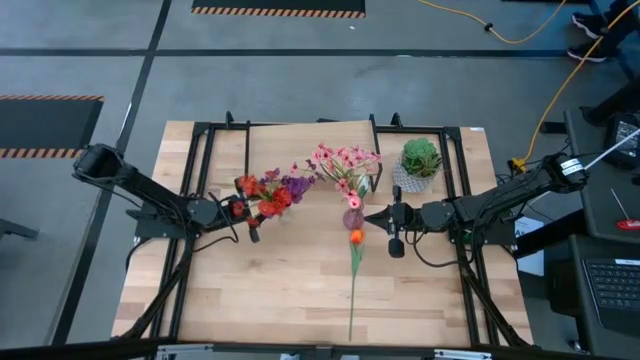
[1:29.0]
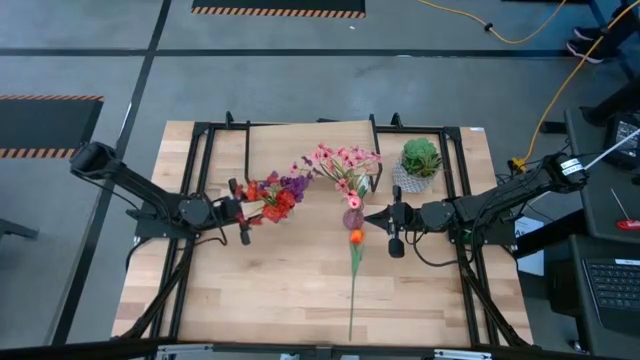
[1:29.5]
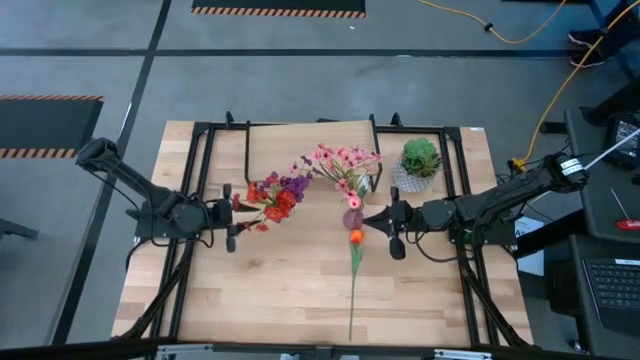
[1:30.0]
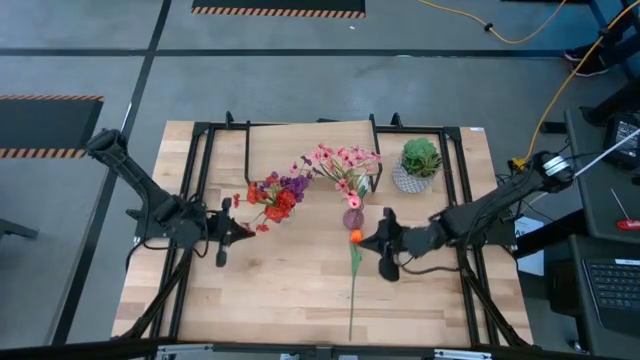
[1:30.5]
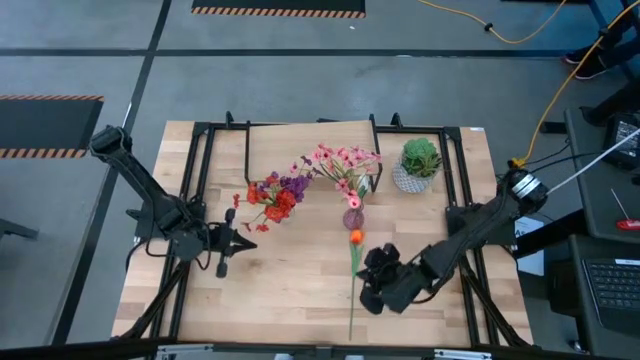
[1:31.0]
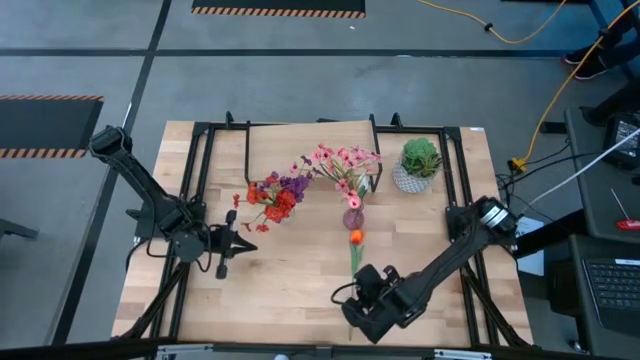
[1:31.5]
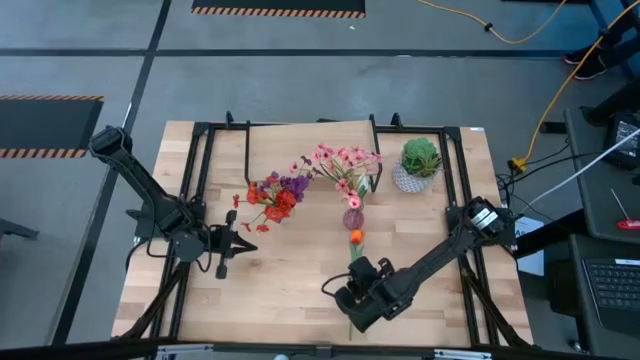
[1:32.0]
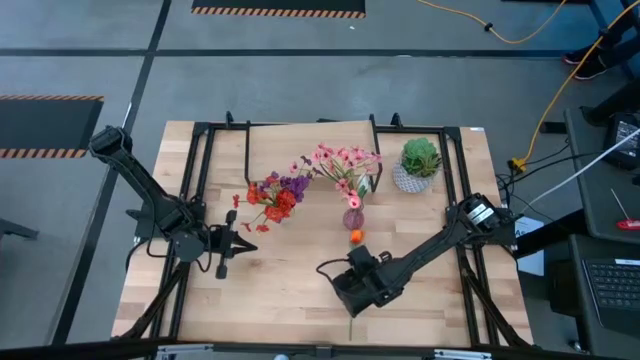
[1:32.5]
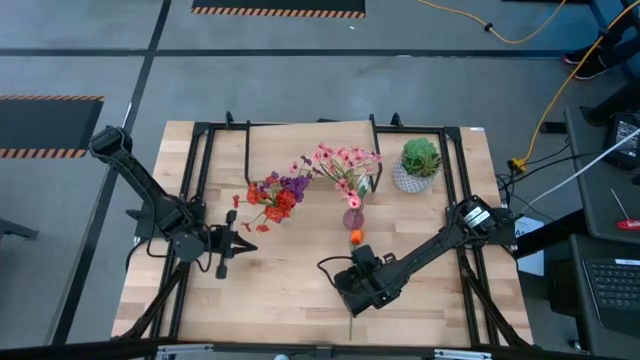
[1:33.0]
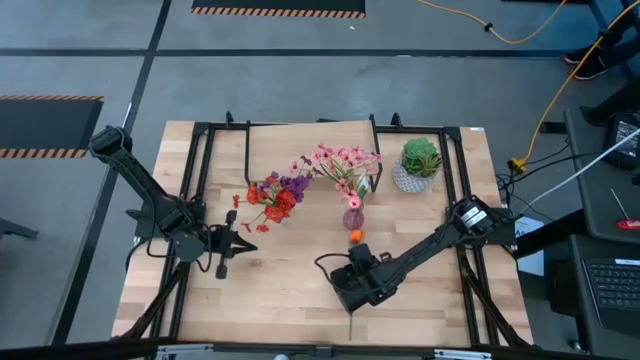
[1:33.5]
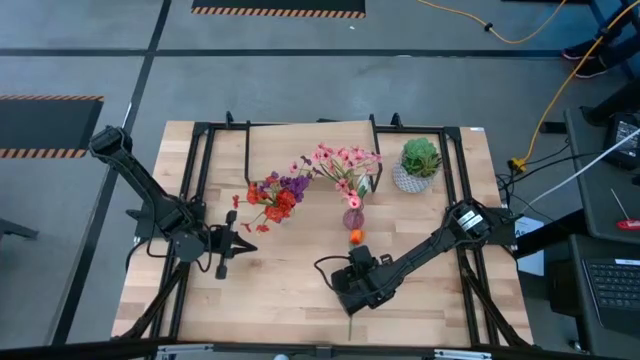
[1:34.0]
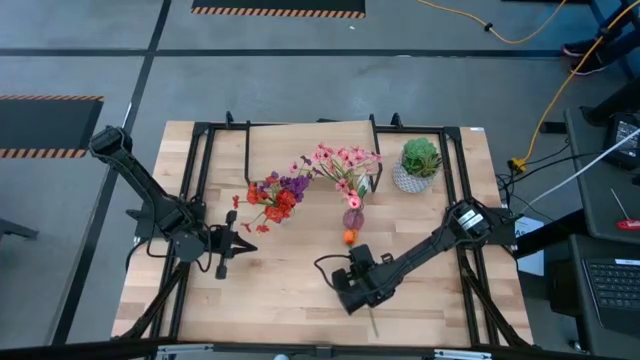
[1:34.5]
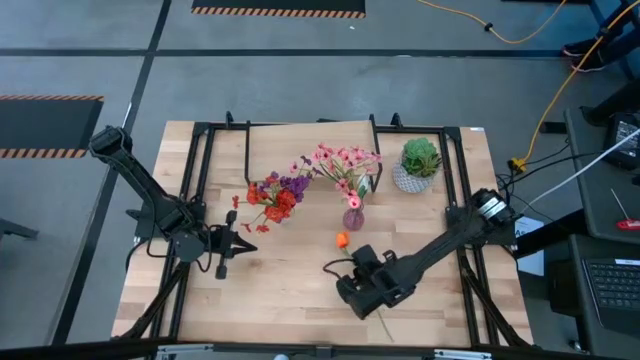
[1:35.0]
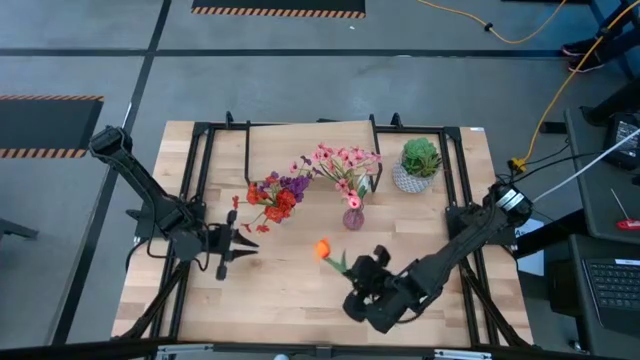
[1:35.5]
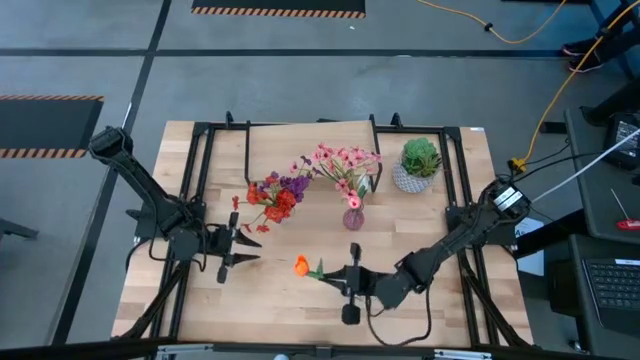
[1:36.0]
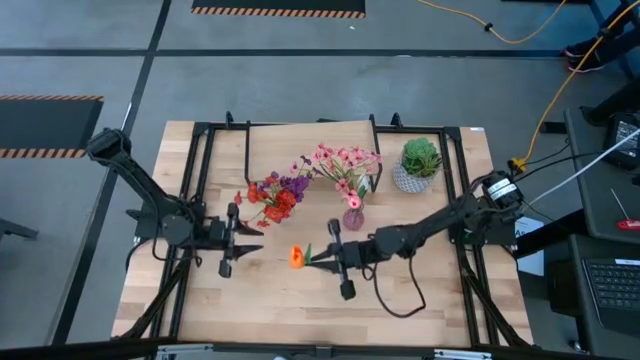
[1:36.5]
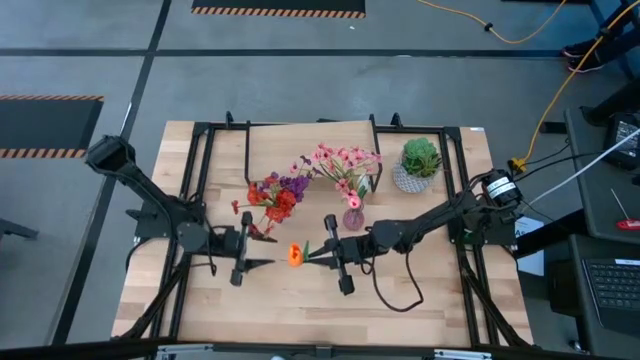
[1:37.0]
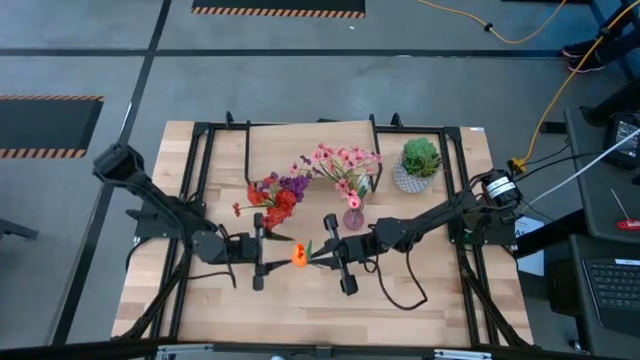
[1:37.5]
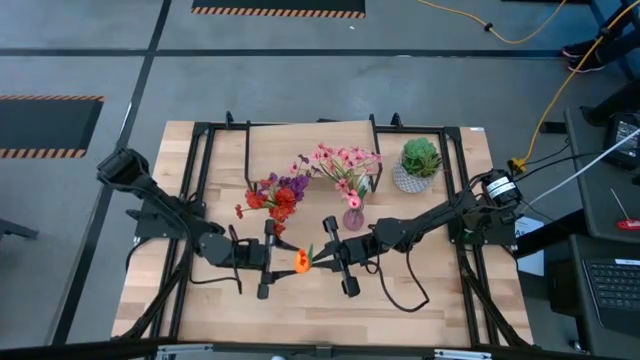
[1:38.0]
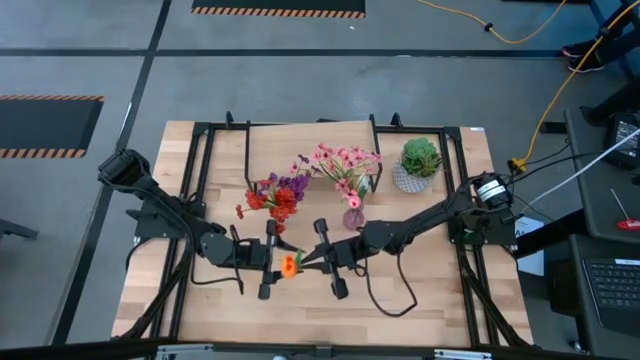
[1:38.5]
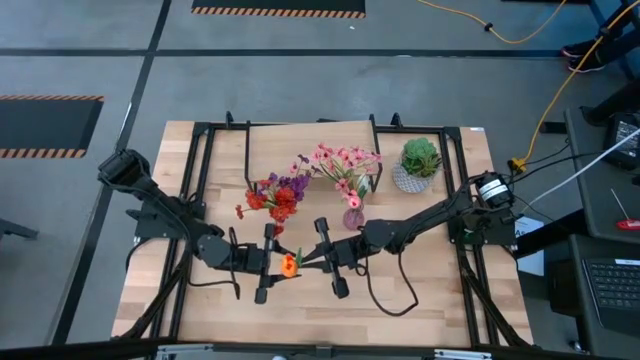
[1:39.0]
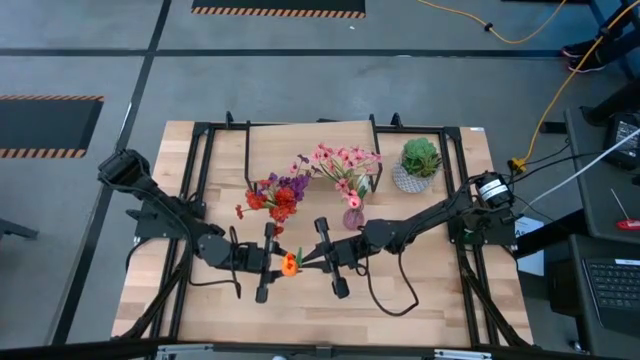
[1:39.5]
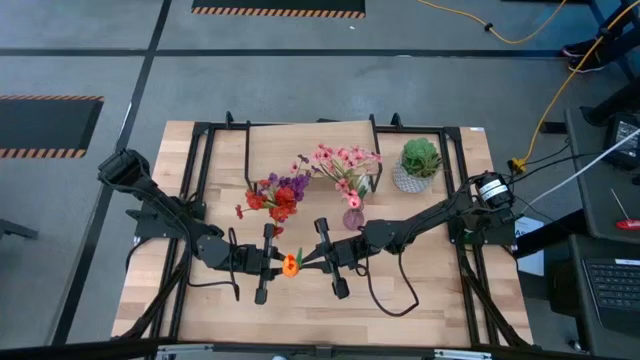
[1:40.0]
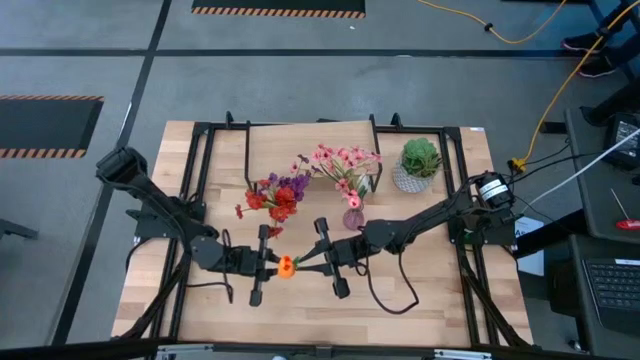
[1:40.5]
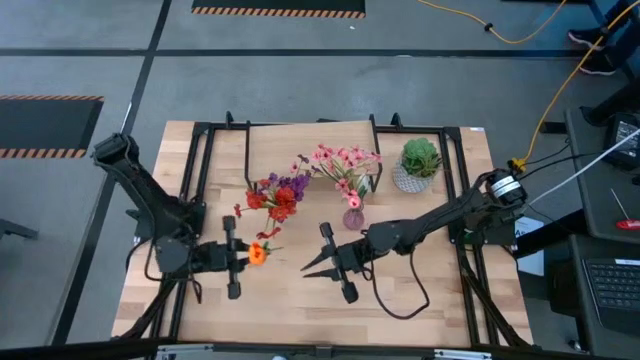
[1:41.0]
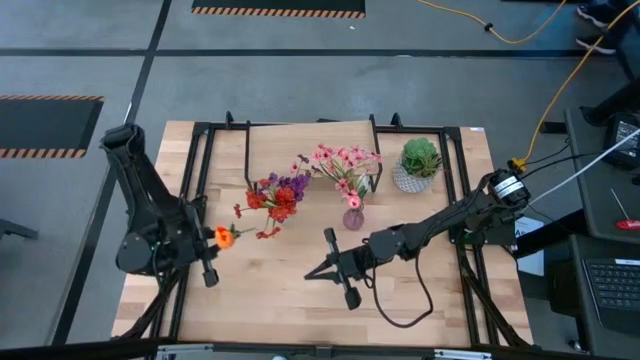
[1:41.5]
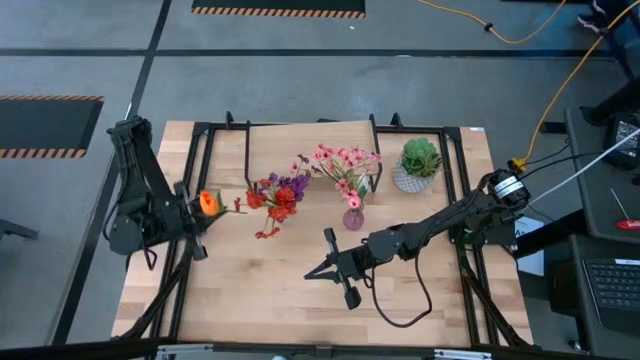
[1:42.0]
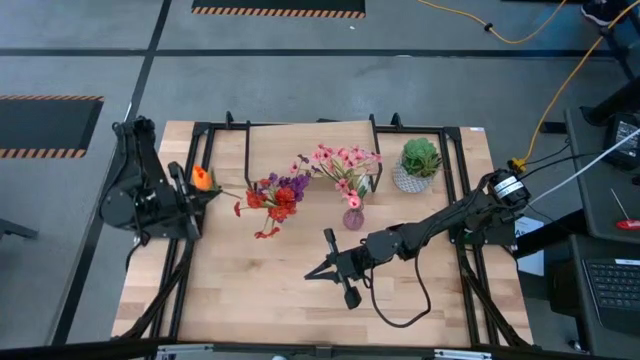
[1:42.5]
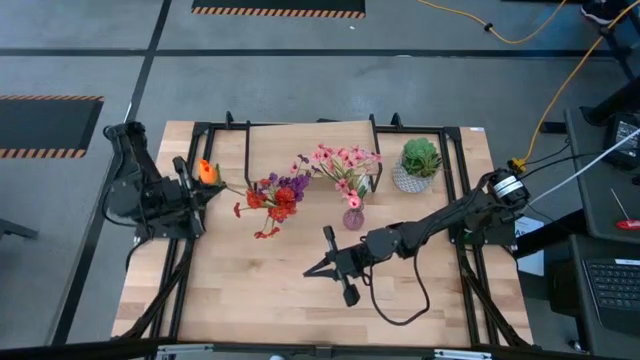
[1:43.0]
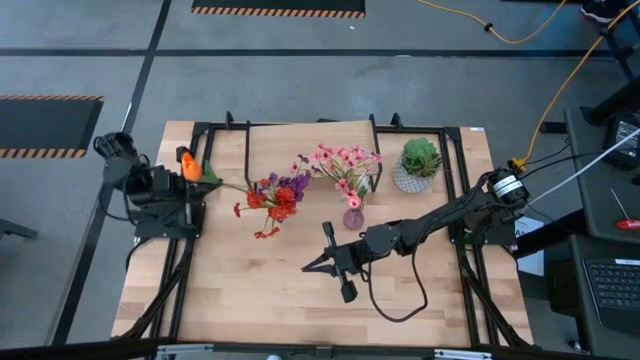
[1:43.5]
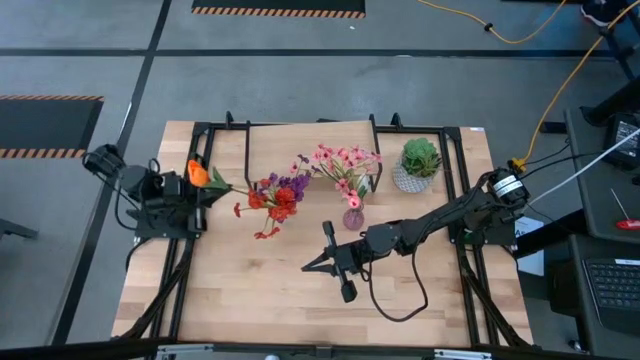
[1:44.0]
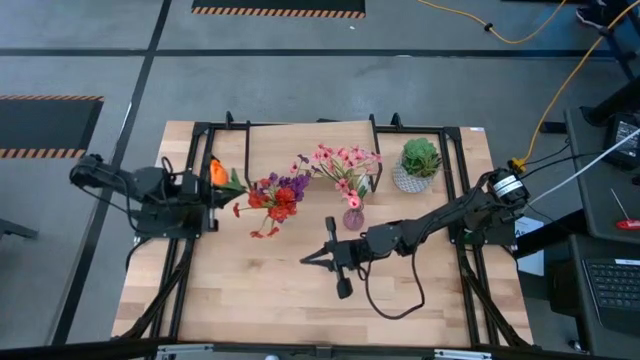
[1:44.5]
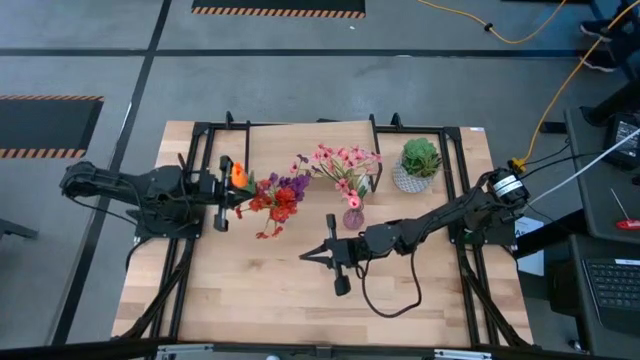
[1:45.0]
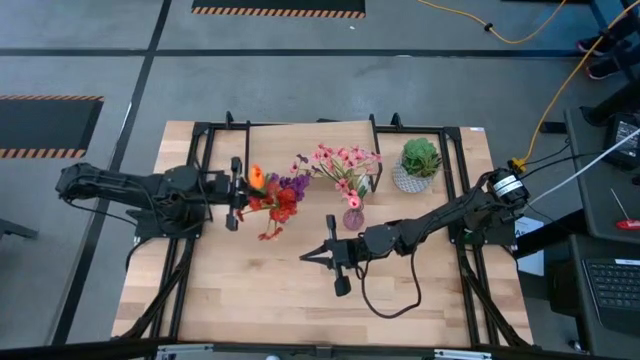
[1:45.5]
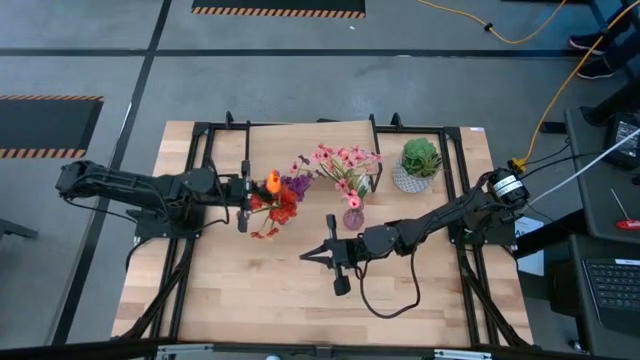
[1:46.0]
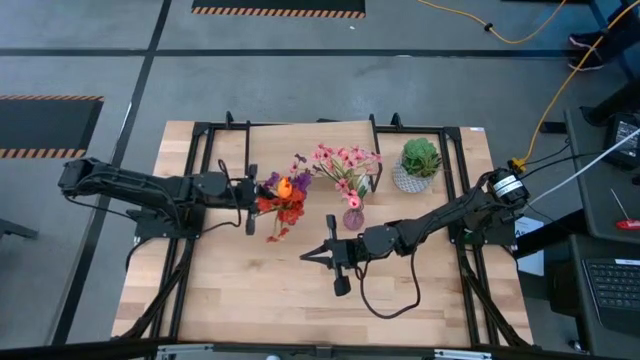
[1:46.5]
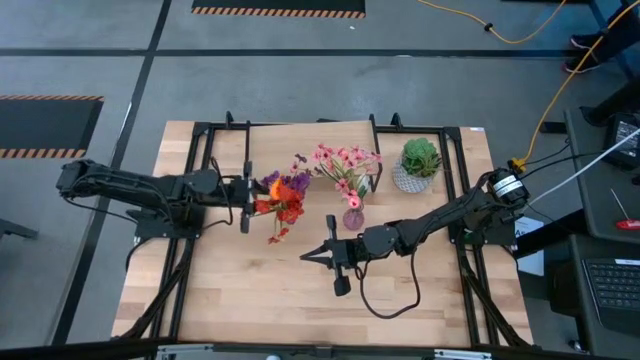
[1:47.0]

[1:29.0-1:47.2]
Task: Pick and place flowers into a vace then onto a shelf
Put the orange flower into the transparent vase
